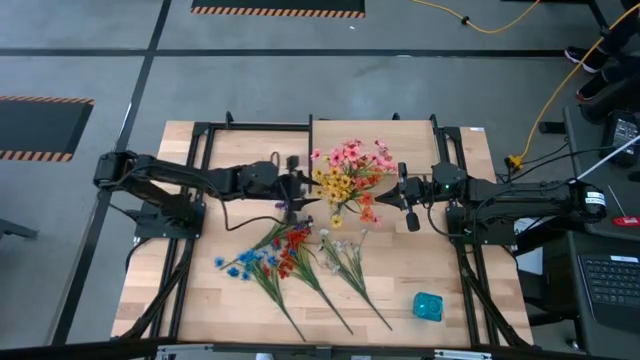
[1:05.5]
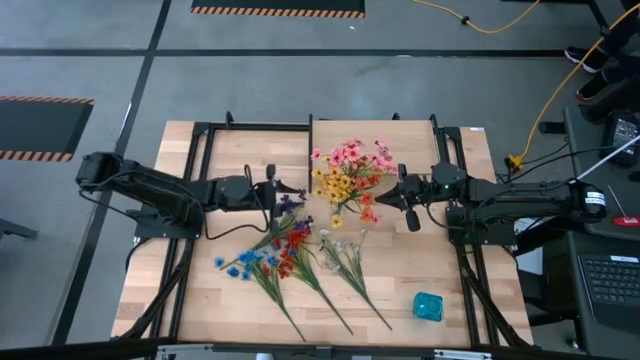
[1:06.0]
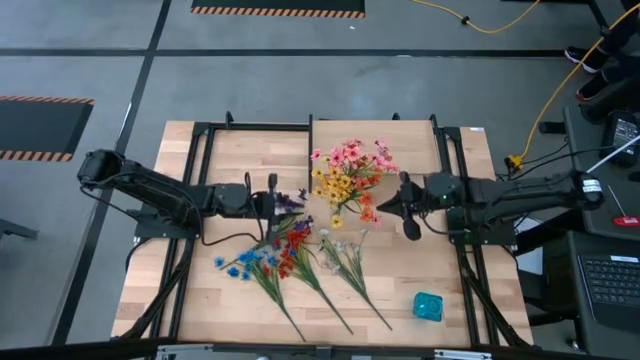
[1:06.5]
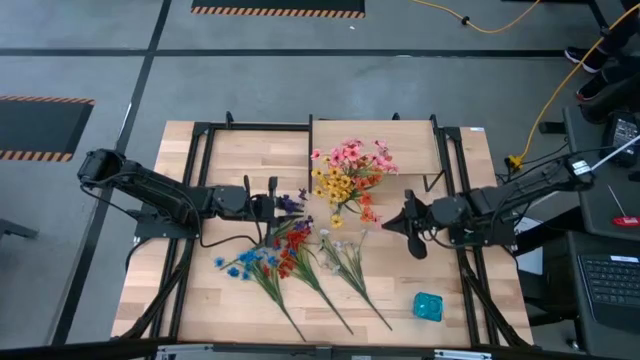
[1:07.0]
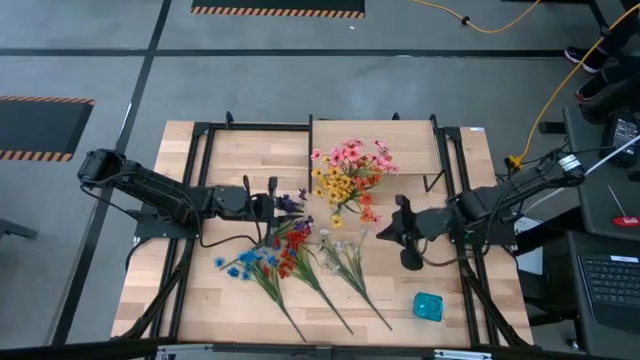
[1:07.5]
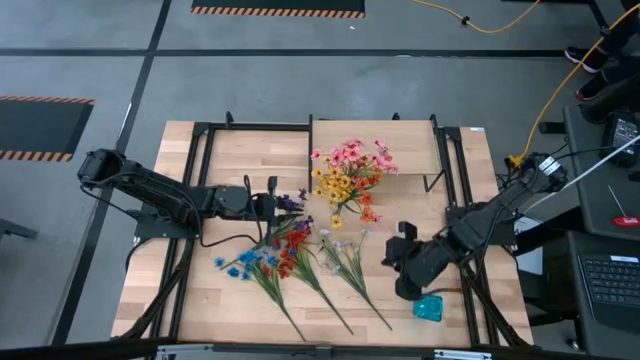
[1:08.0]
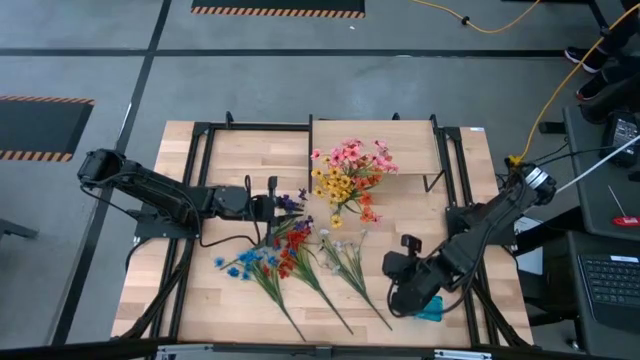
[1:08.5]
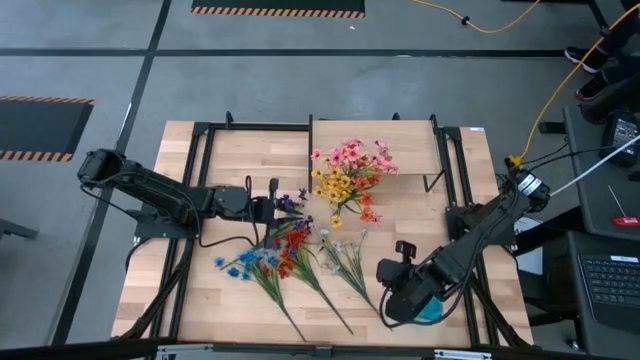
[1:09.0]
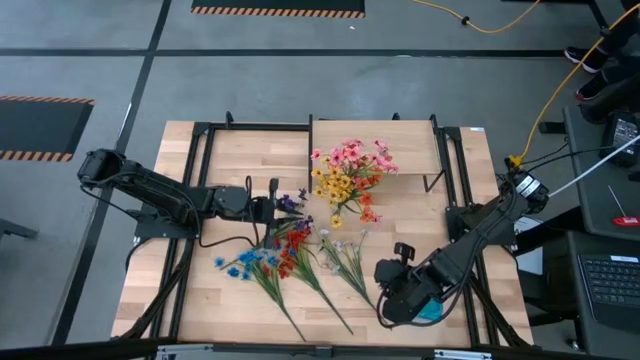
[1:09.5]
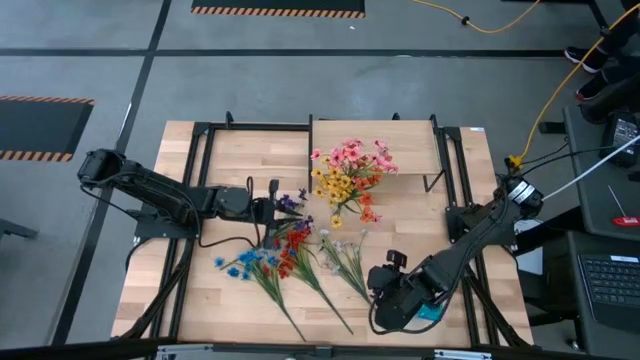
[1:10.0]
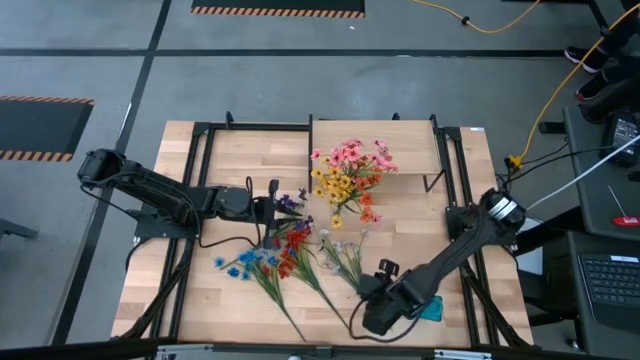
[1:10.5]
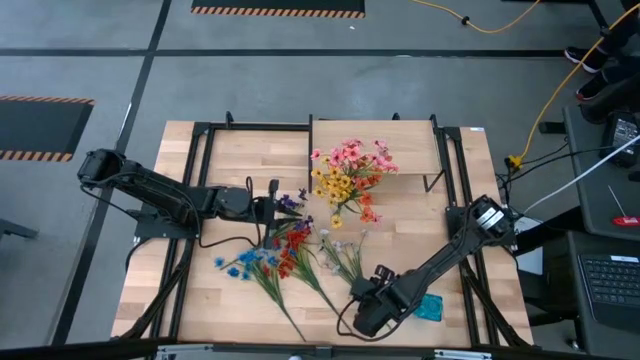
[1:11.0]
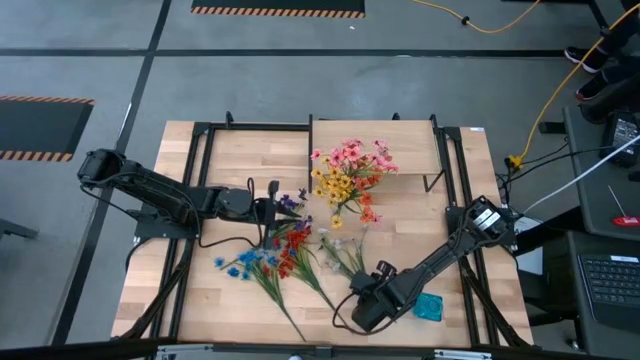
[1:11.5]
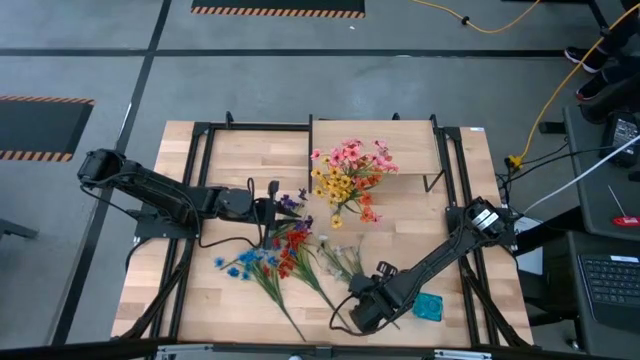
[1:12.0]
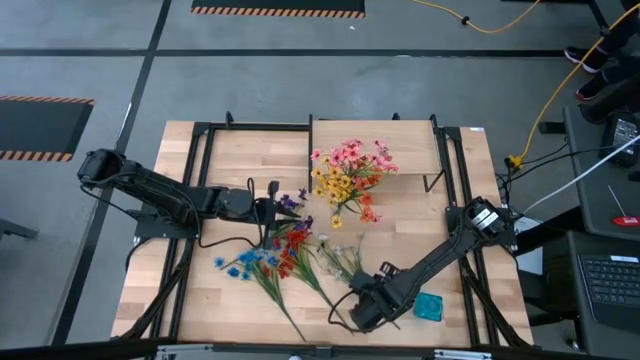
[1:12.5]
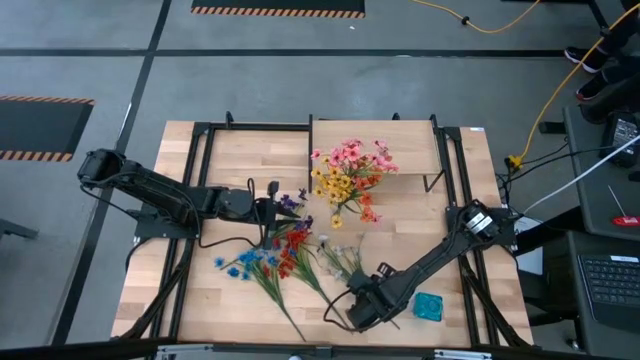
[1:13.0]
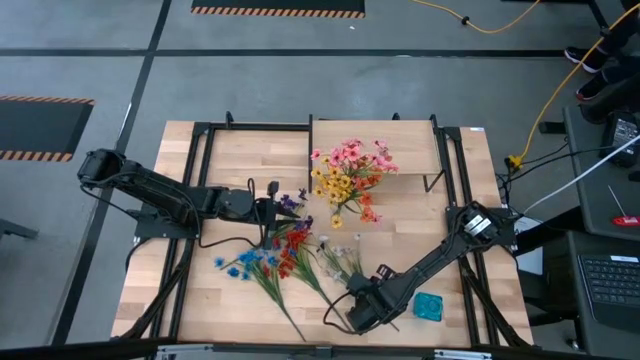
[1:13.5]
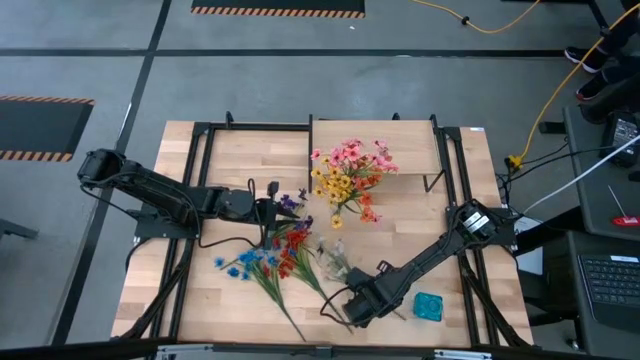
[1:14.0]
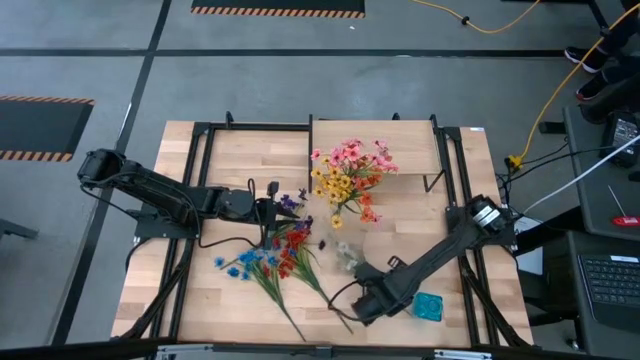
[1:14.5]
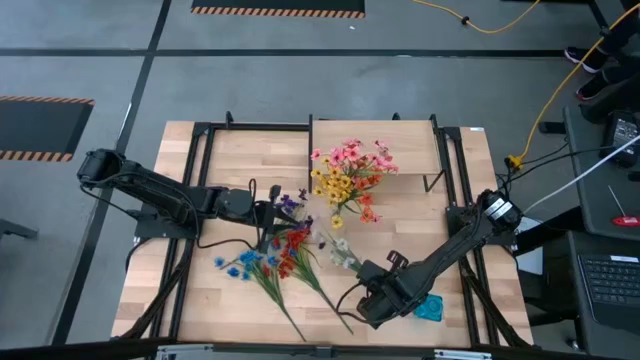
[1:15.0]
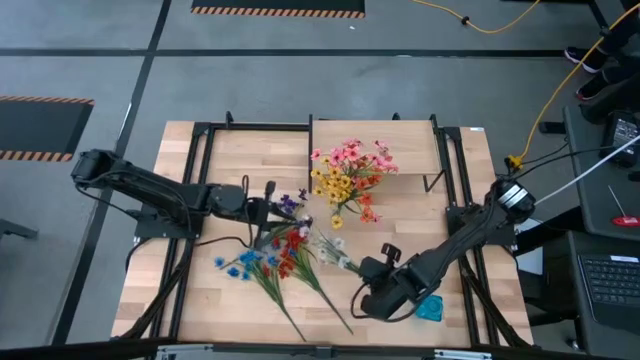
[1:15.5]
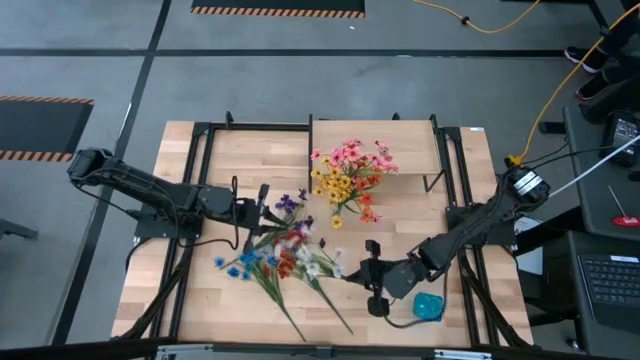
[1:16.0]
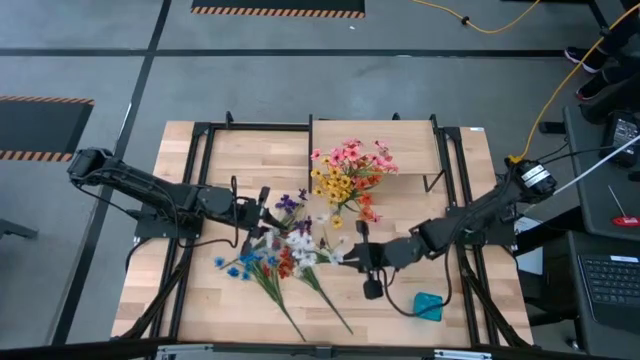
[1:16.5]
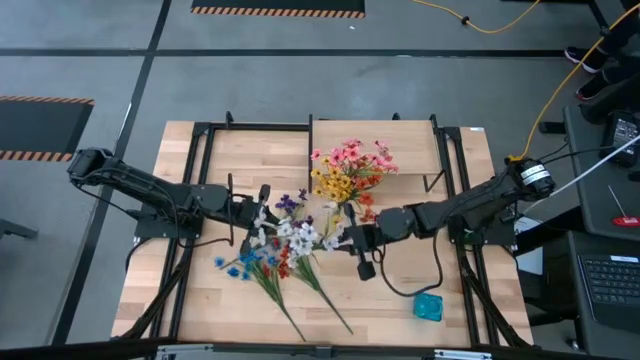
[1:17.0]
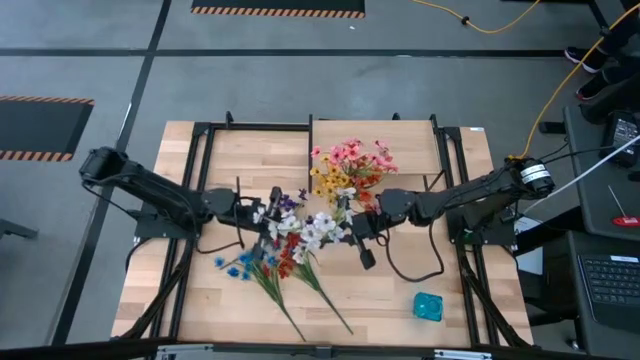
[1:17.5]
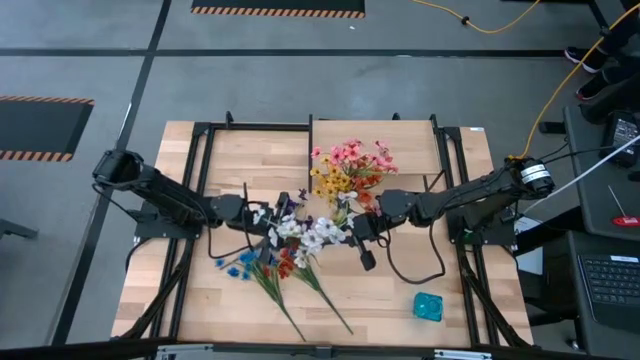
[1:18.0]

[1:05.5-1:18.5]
Task: Pick and place flowers into a vace then onto a shelf
Put the white flowers into the transparent vase

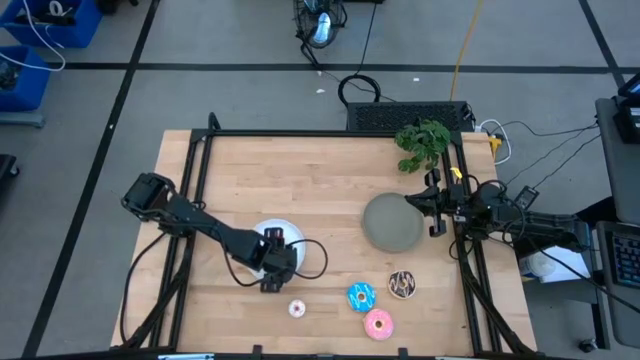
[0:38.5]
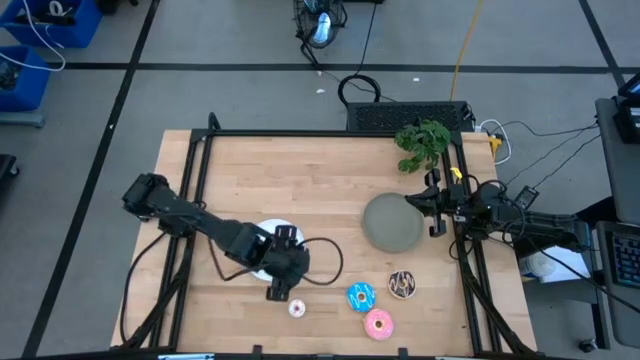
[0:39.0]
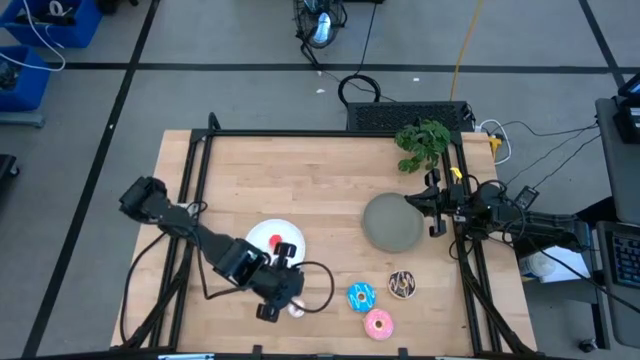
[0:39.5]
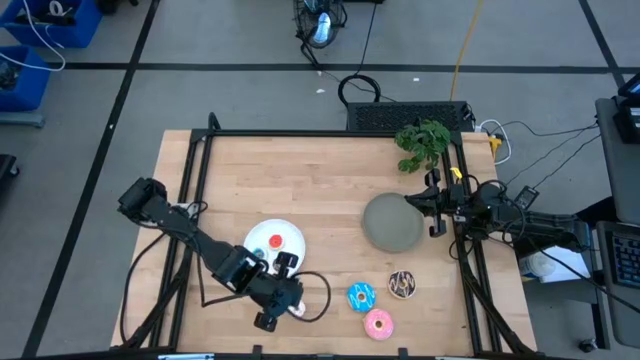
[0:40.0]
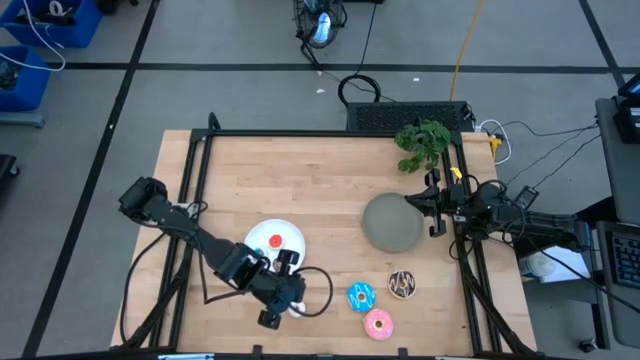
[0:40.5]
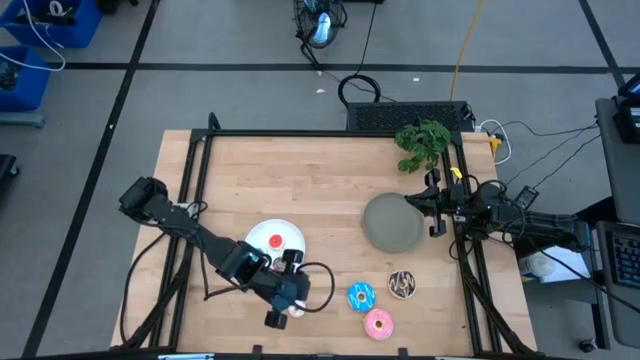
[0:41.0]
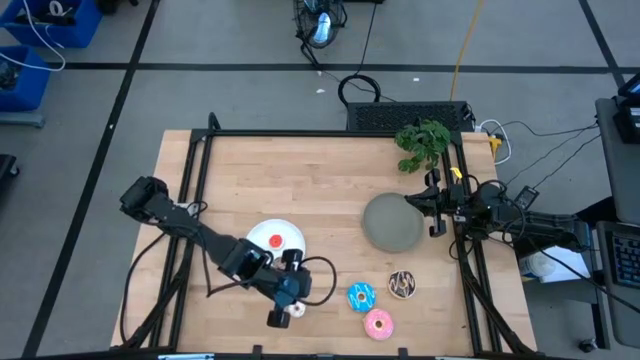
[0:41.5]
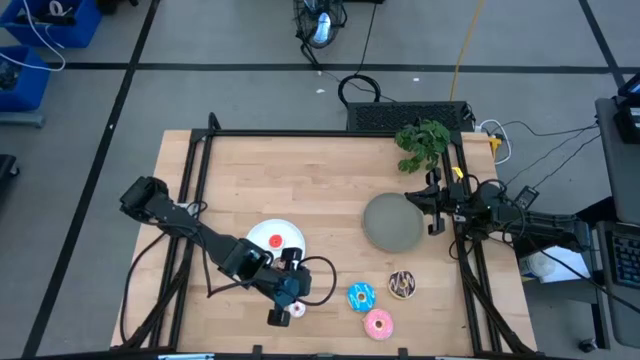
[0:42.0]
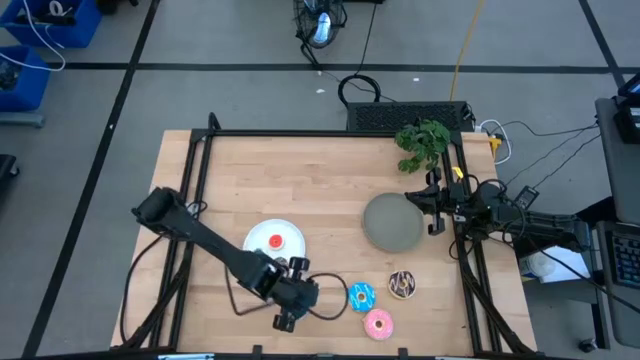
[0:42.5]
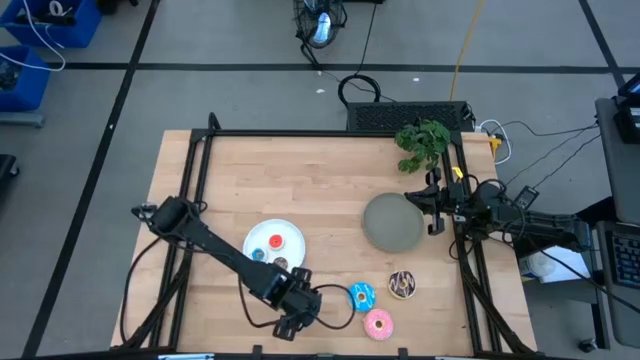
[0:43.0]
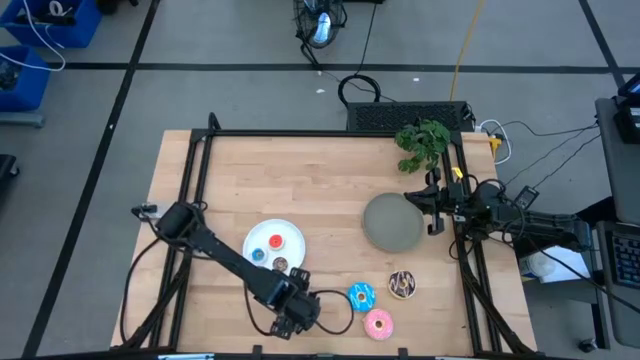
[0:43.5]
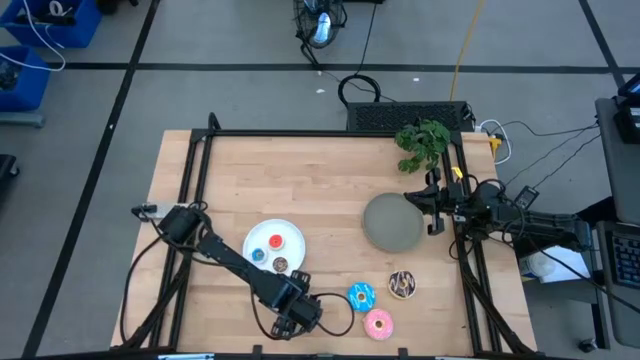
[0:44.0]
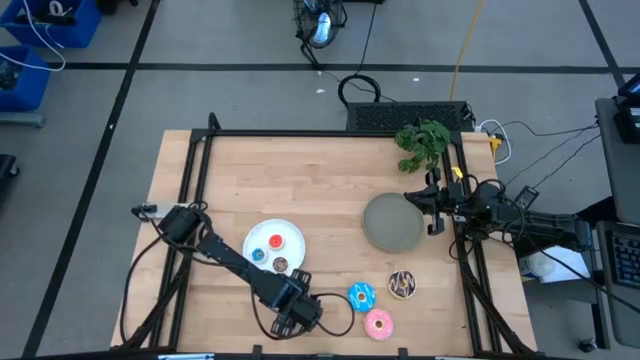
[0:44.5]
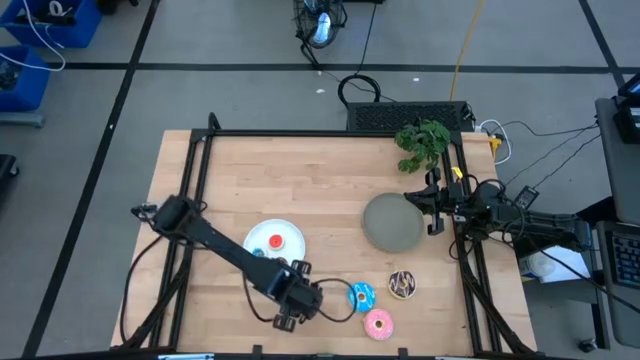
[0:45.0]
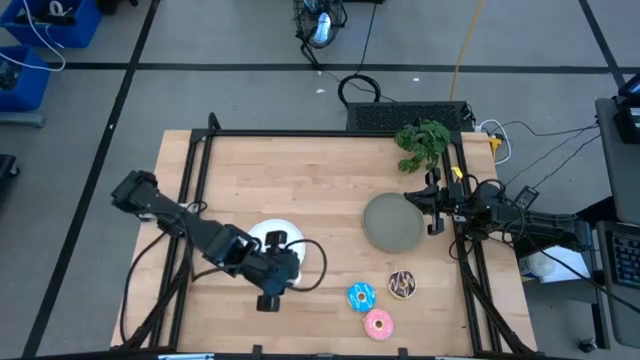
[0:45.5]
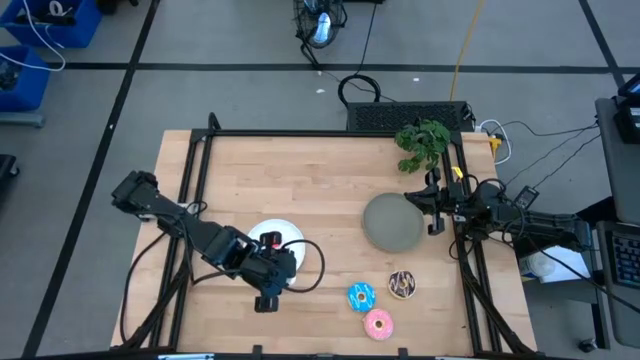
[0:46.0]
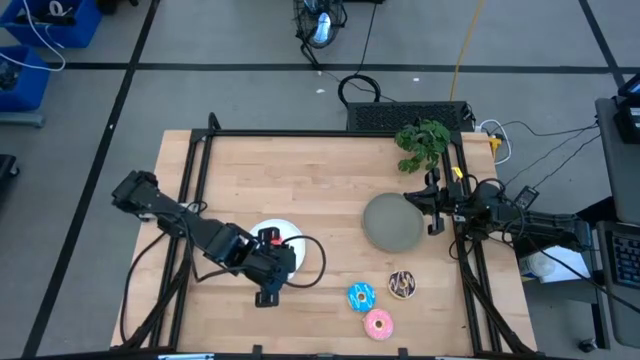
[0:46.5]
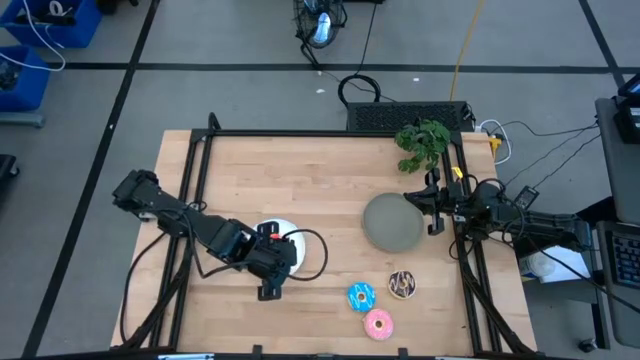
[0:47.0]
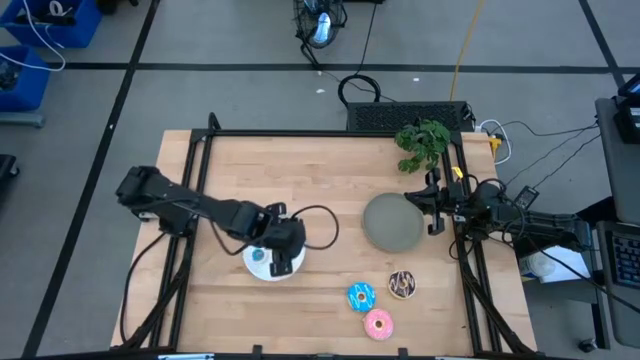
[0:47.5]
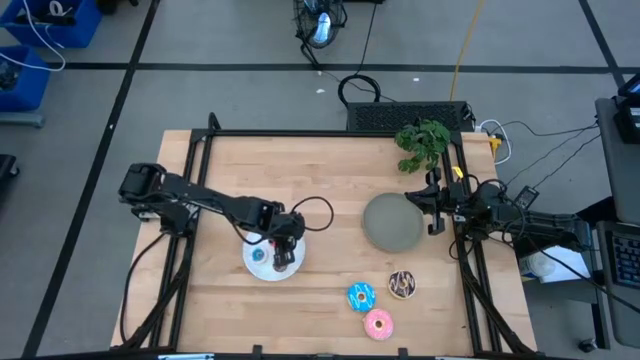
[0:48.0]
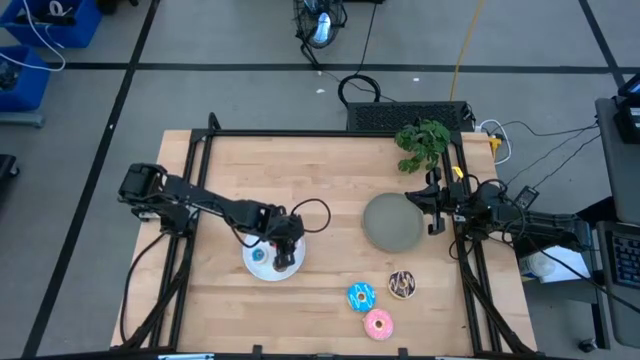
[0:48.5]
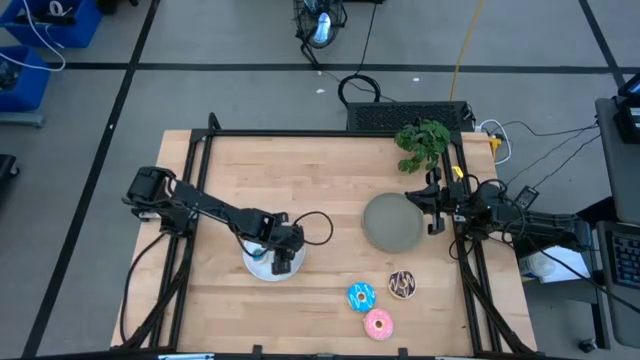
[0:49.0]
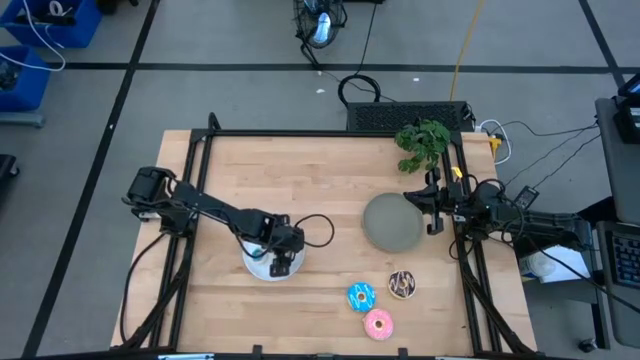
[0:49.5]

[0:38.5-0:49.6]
Task: Pick & Place donuts
Put the small white donut on the white plate
